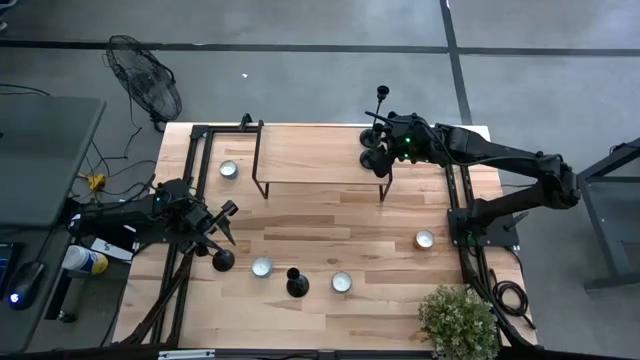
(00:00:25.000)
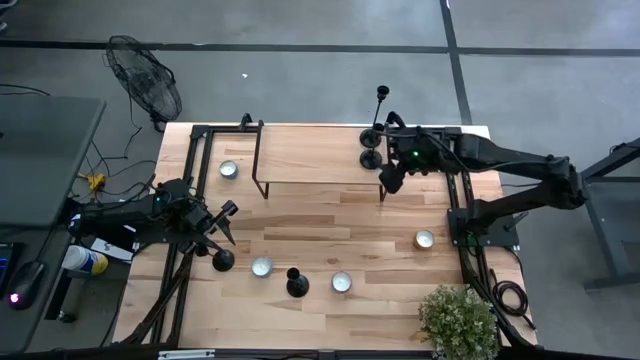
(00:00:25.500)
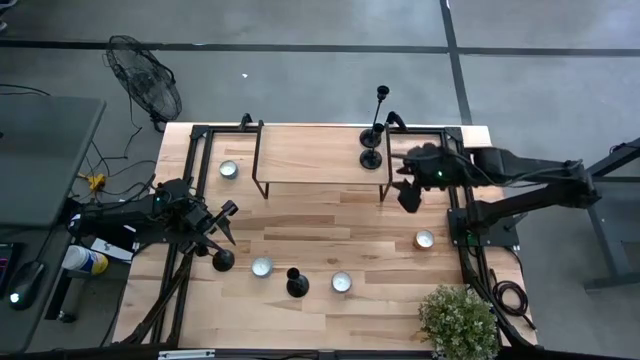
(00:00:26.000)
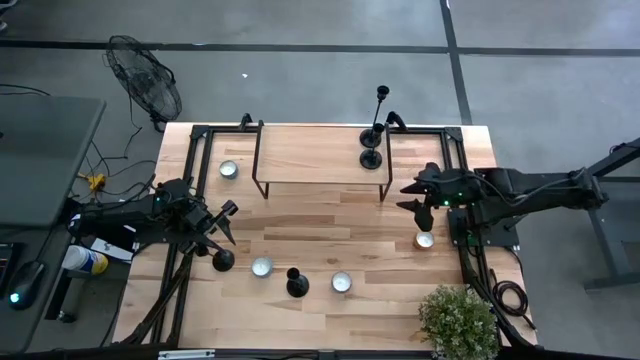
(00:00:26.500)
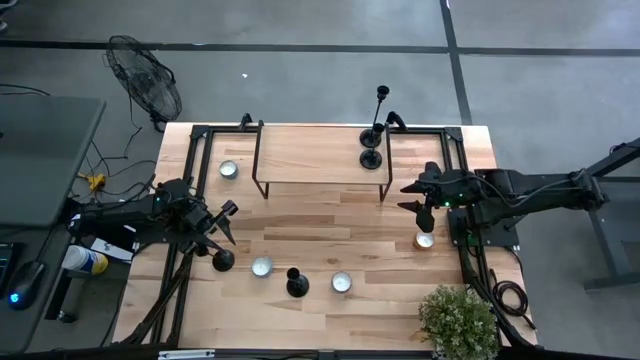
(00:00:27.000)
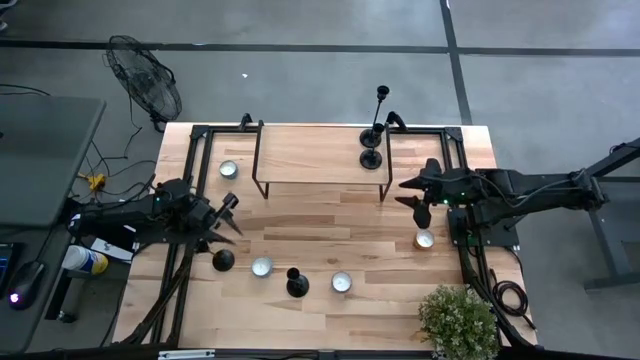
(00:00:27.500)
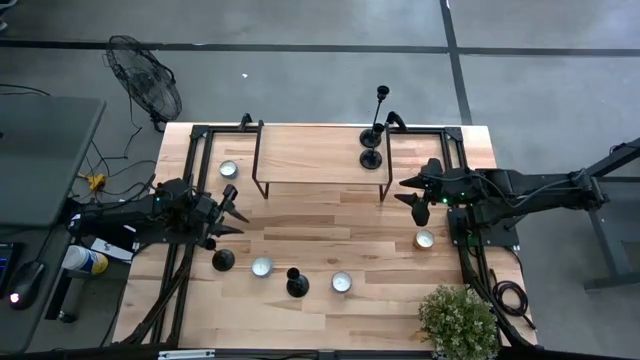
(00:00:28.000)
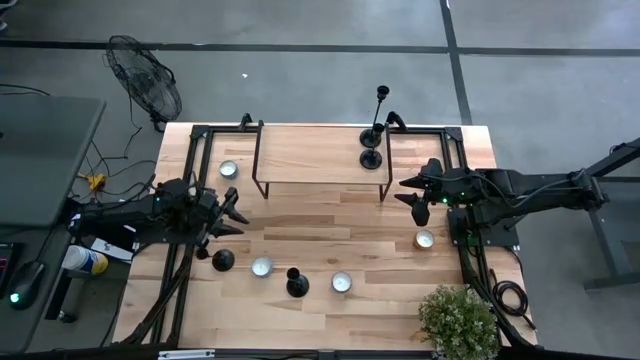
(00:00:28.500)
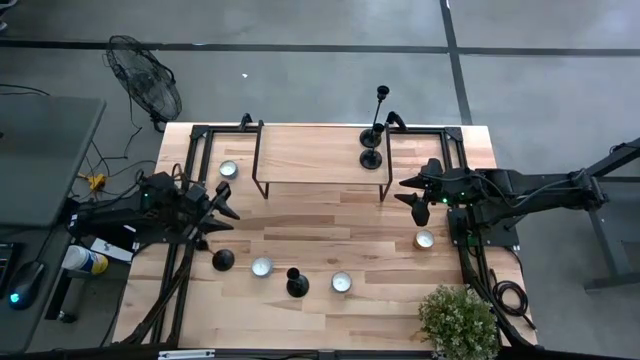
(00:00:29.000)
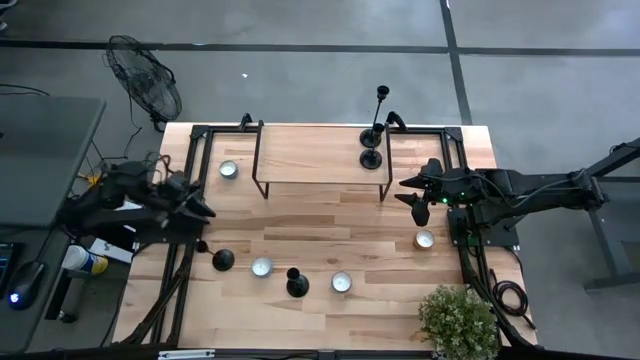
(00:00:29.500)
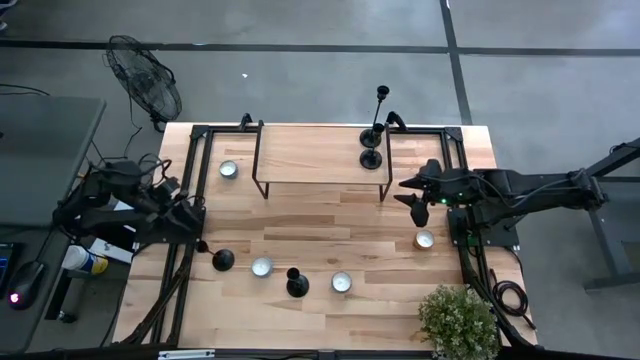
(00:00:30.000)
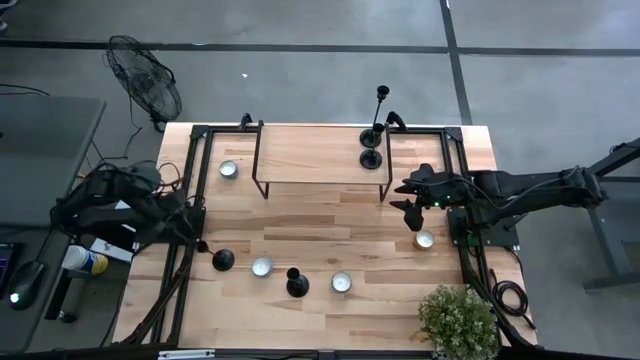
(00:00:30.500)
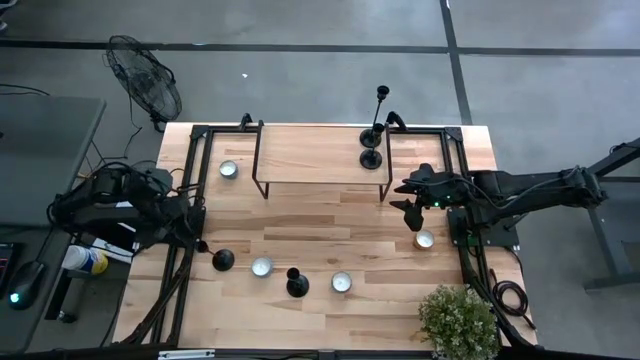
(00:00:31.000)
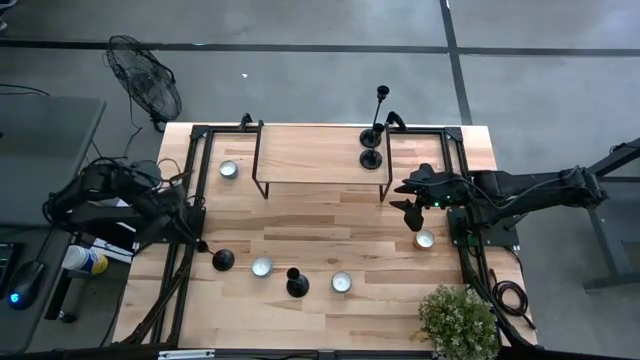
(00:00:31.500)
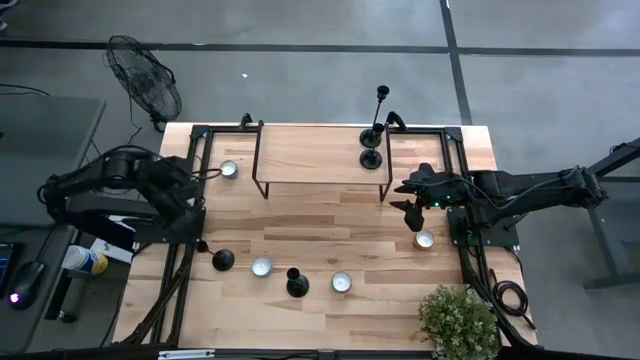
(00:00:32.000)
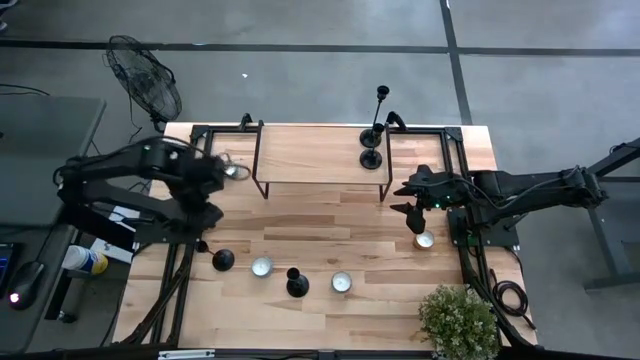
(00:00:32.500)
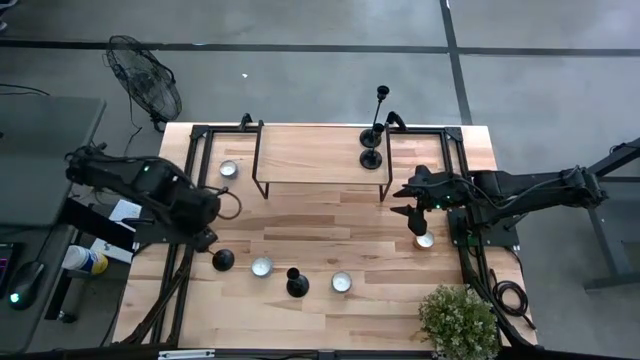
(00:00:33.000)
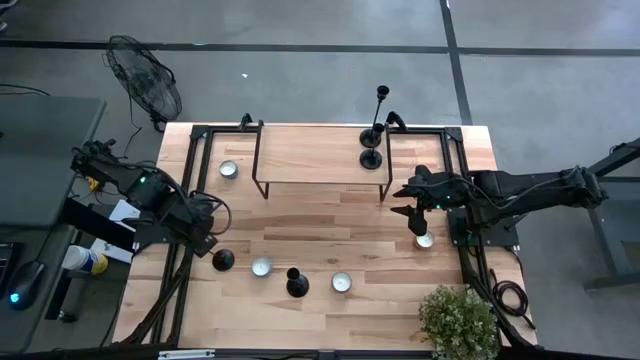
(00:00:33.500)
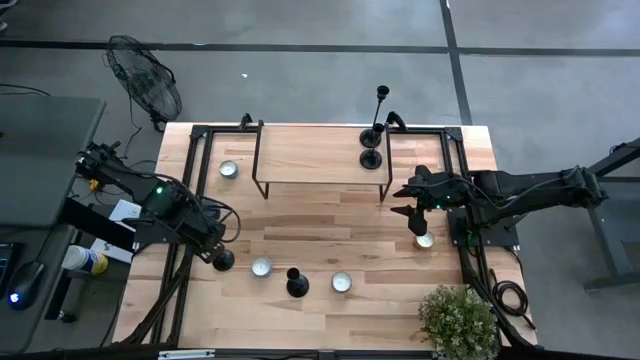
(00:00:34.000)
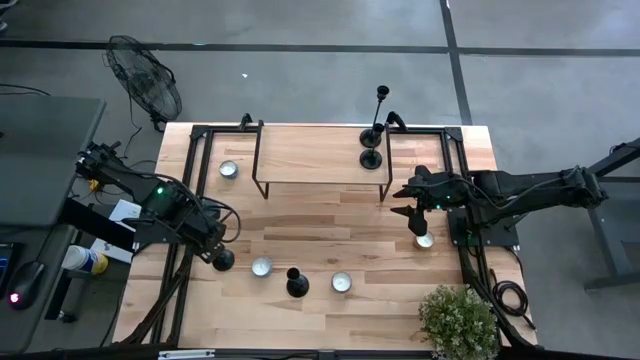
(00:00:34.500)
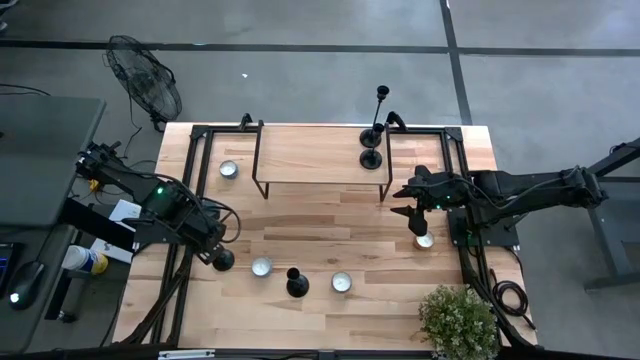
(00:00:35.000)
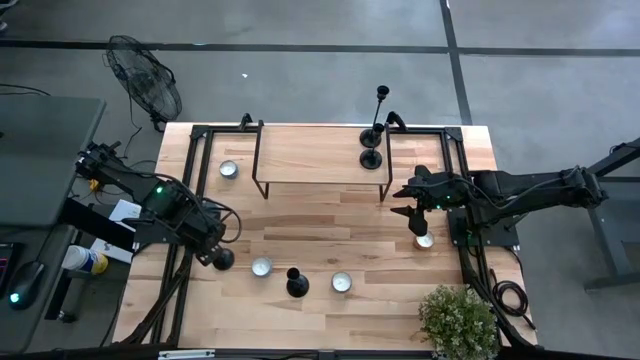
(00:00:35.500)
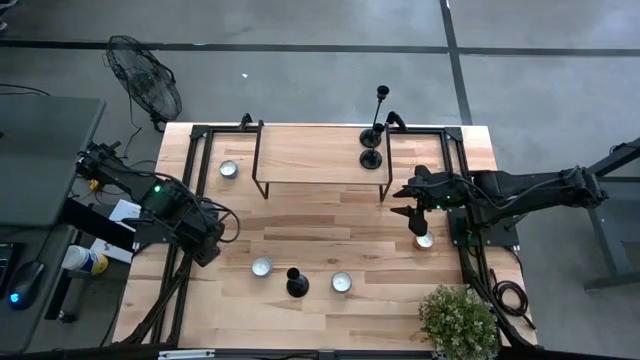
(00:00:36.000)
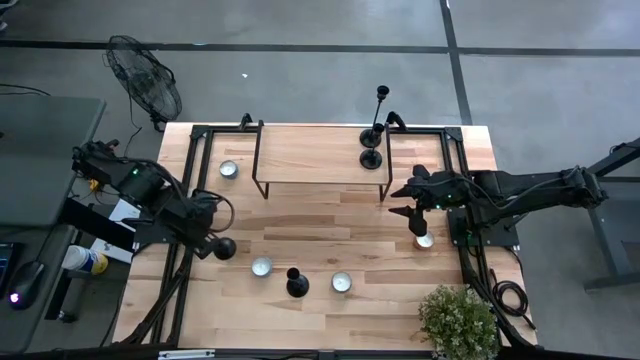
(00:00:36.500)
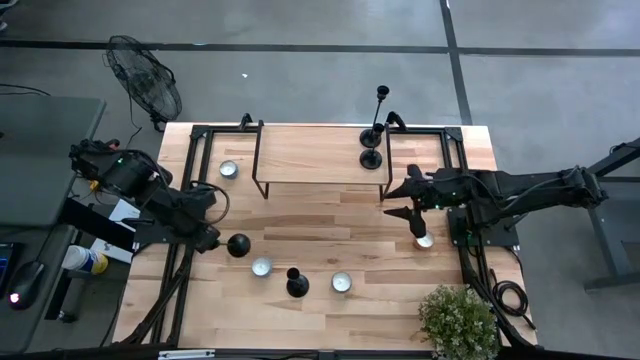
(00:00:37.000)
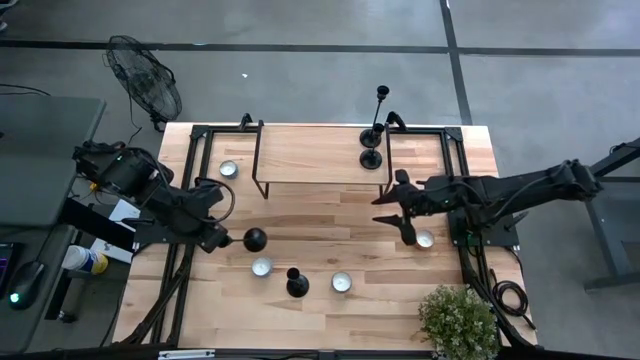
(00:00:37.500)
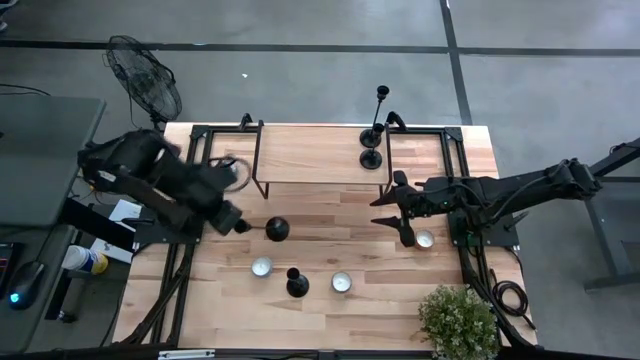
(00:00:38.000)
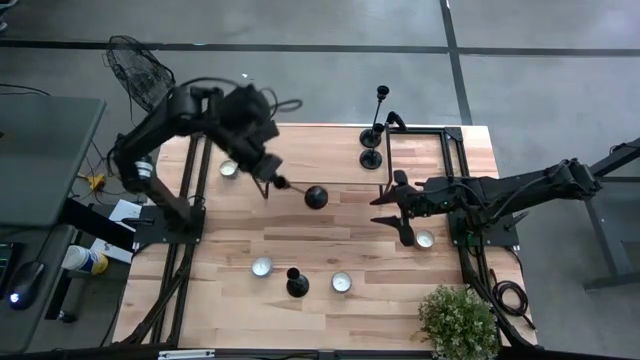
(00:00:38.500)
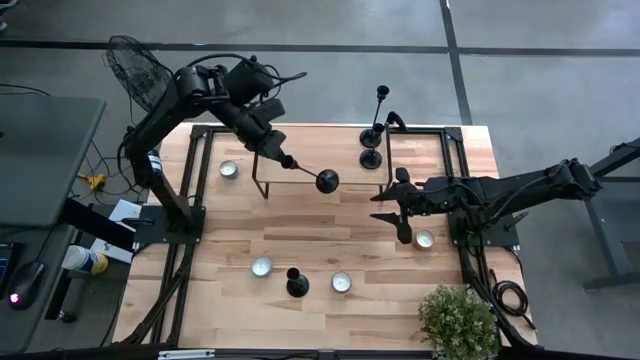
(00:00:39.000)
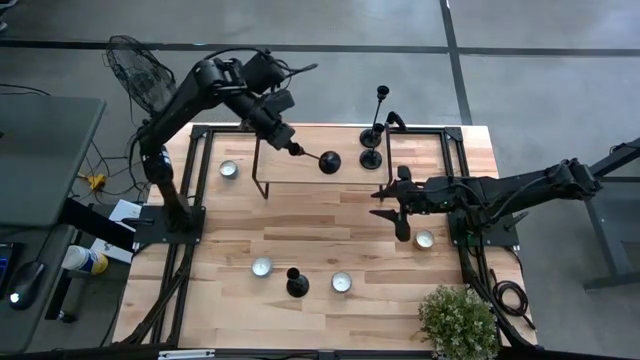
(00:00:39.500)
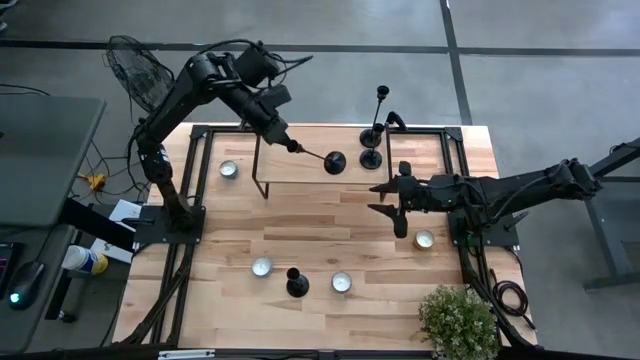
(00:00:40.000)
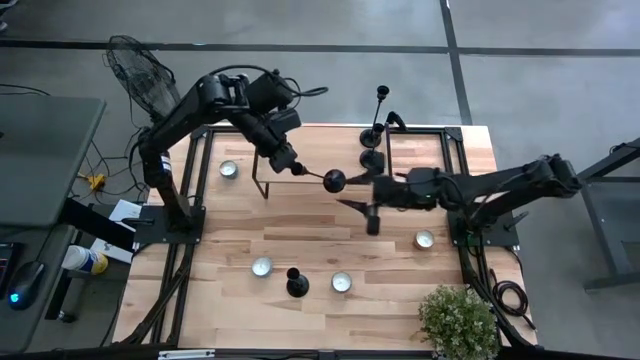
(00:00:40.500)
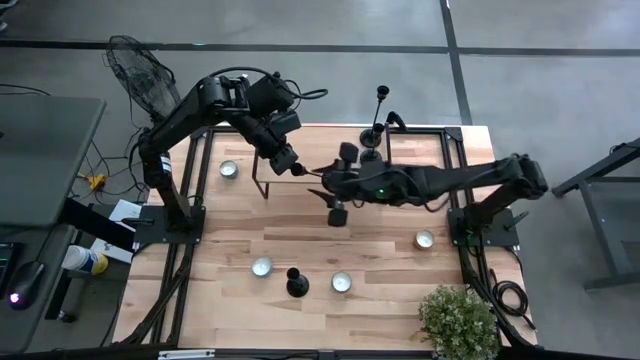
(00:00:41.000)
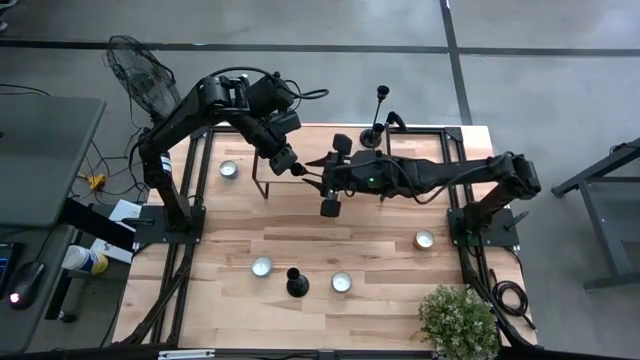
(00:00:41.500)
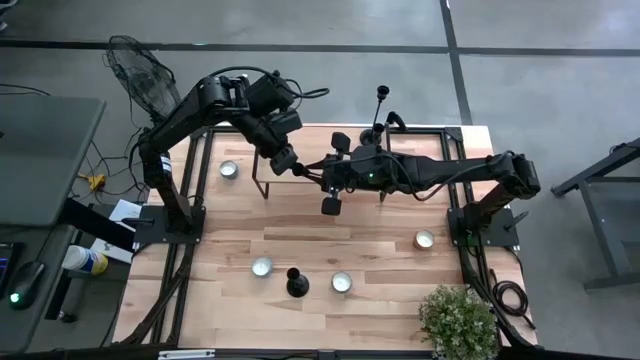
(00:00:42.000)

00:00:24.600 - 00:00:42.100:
Task: Pick & Place candle stick holders
Put the black candle holder on the shelf

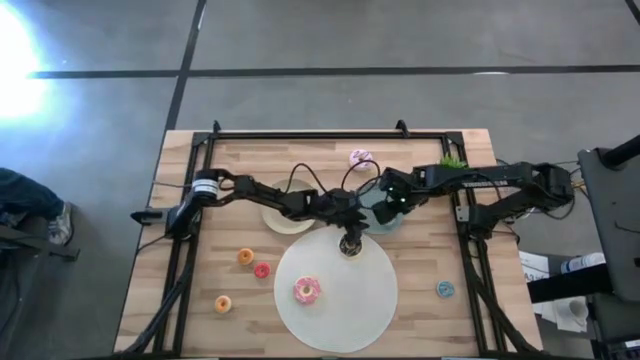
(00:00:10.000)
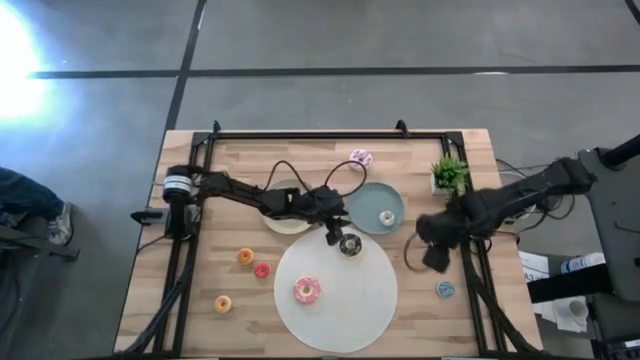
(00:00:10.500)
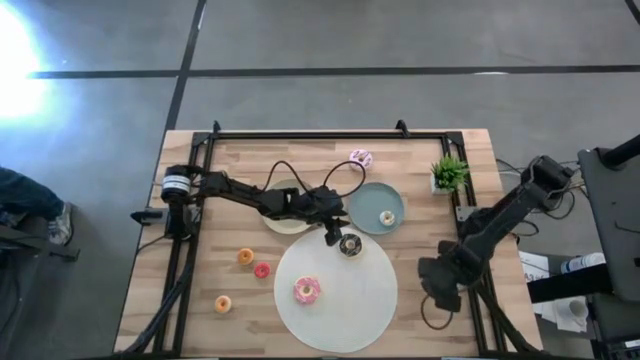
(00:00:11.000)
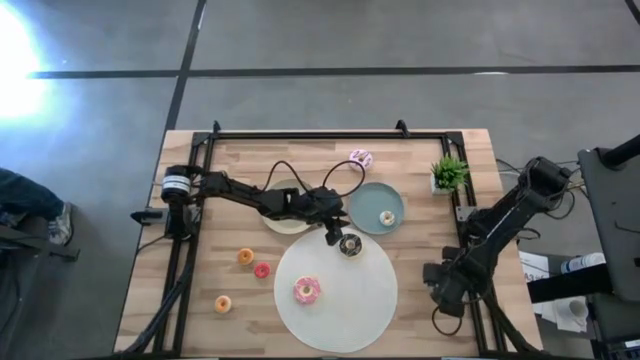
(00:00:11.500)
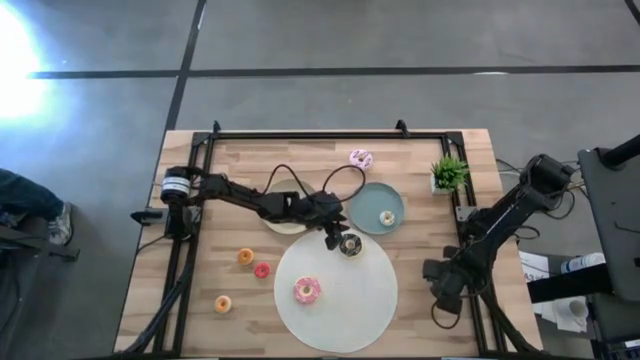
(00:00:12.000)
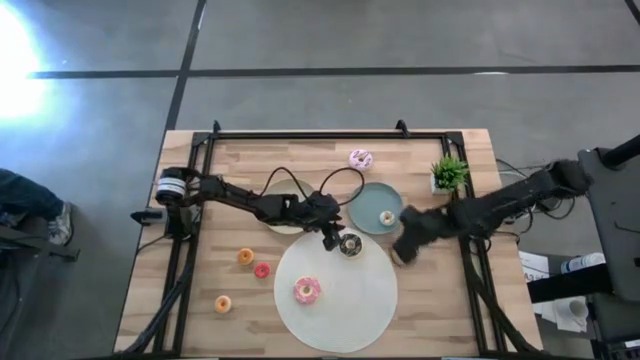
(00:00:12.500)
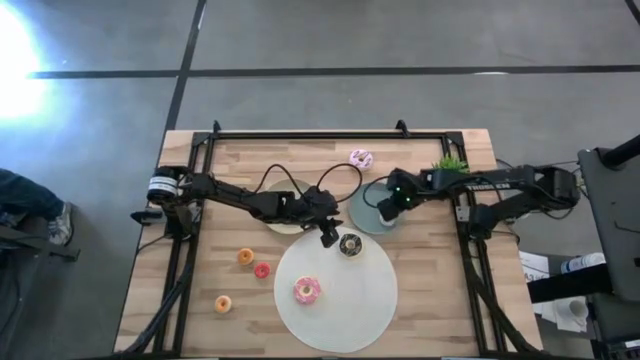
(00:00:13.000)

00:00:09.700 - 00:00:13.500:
Task: Pick & Place donuts
Put the small blue donut on the light blue plate
